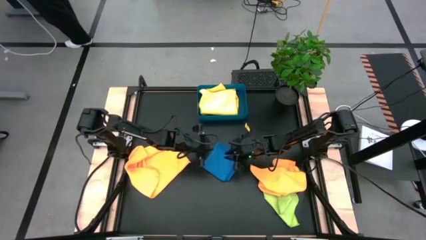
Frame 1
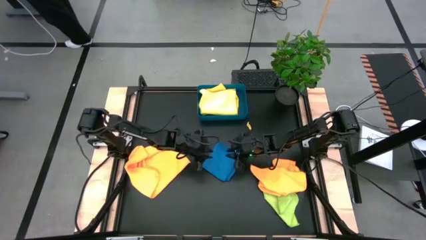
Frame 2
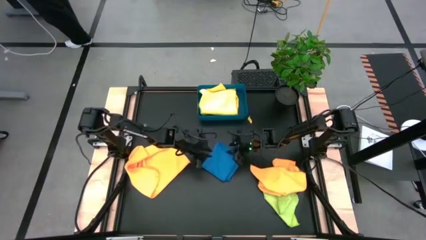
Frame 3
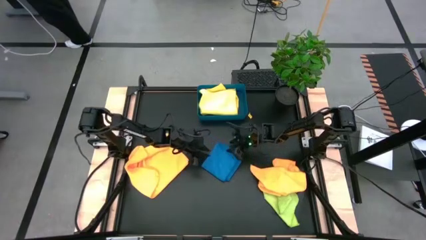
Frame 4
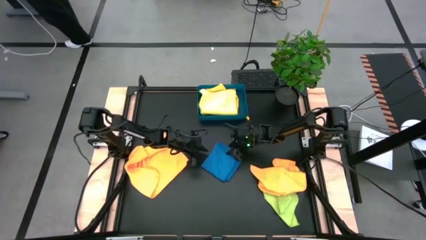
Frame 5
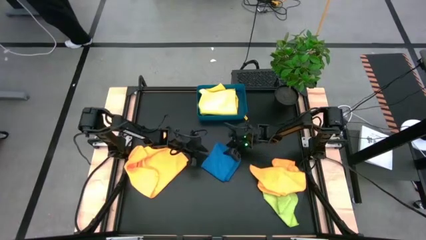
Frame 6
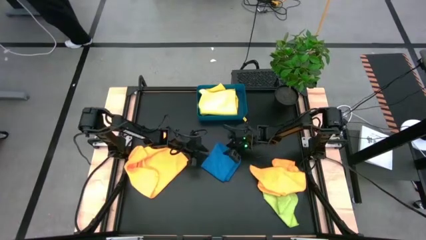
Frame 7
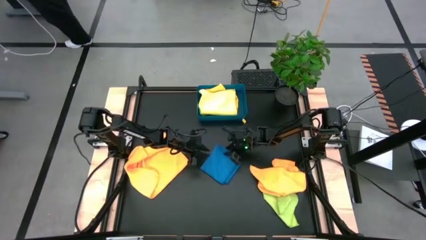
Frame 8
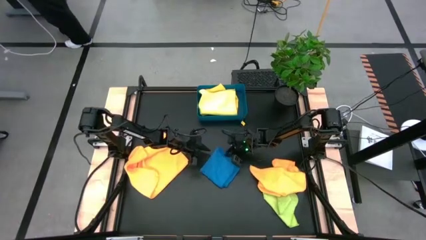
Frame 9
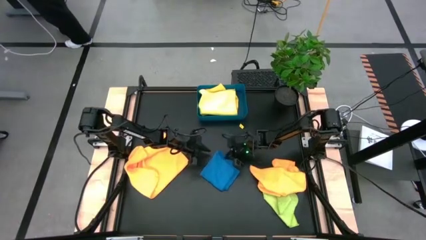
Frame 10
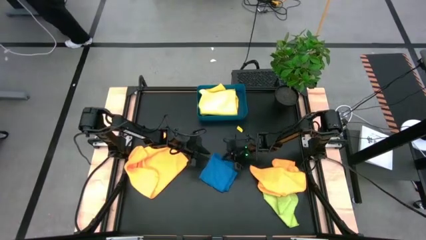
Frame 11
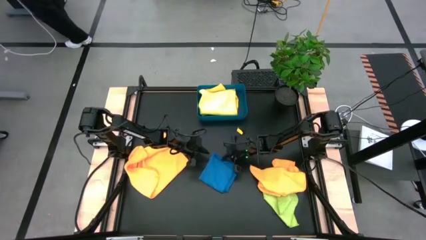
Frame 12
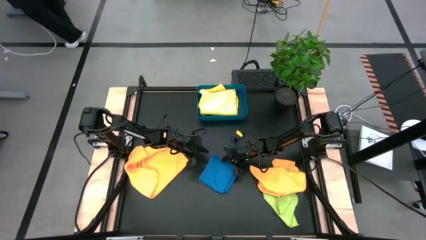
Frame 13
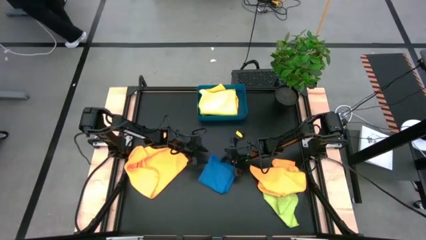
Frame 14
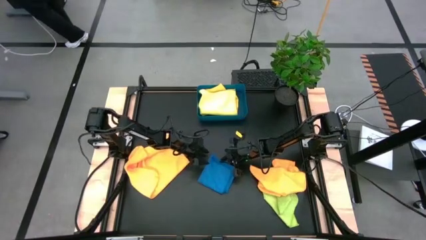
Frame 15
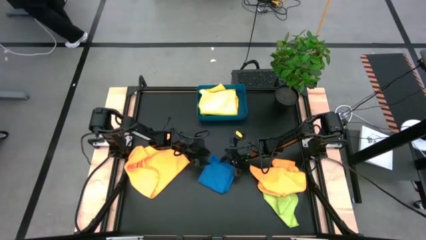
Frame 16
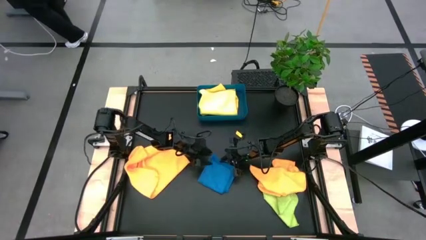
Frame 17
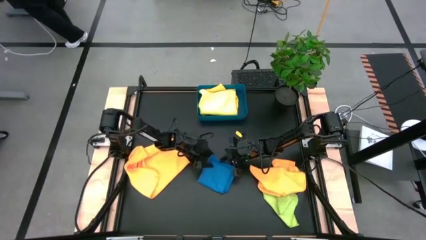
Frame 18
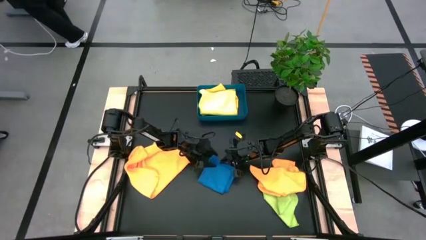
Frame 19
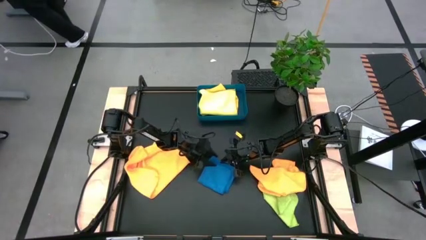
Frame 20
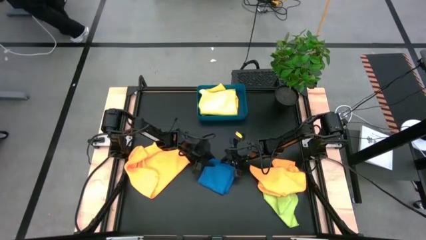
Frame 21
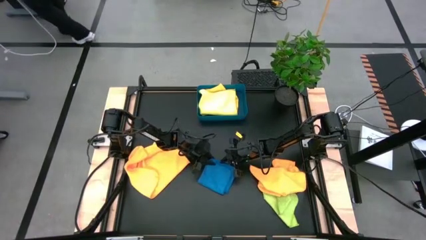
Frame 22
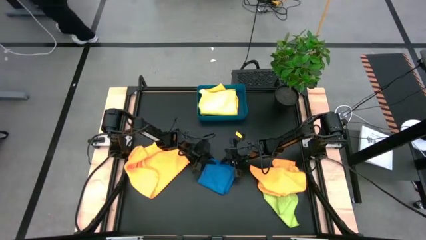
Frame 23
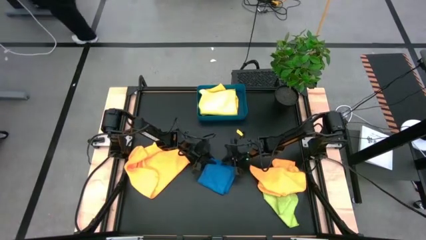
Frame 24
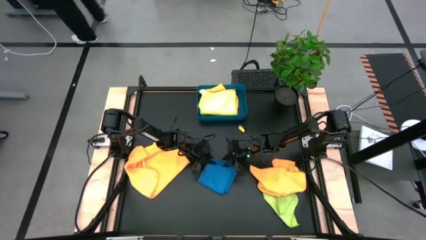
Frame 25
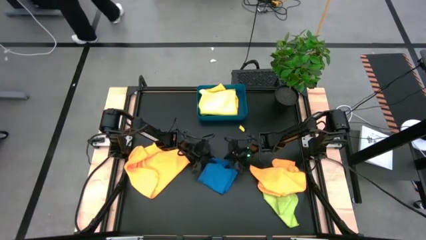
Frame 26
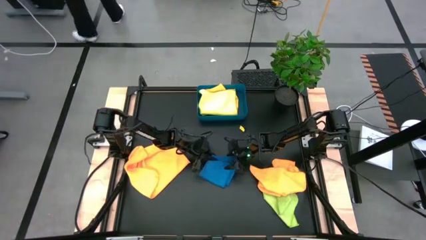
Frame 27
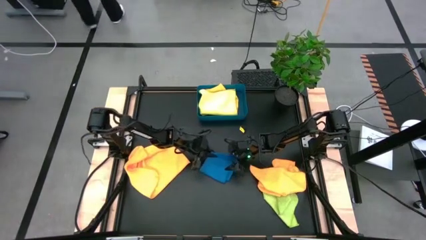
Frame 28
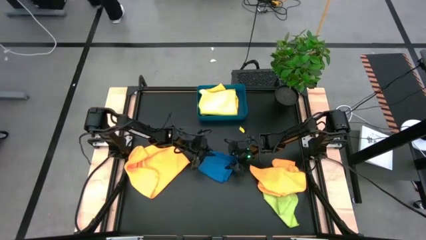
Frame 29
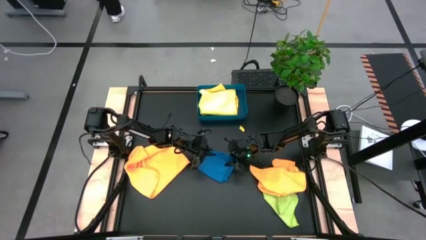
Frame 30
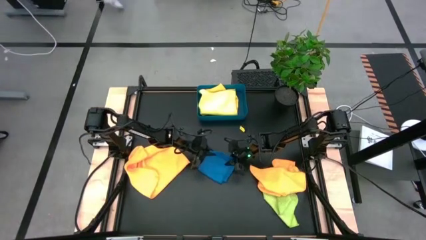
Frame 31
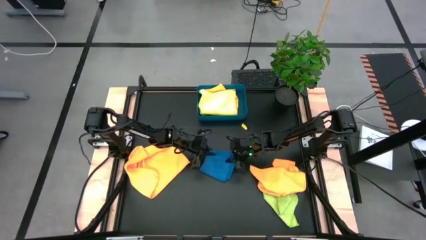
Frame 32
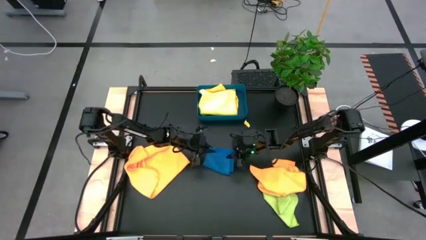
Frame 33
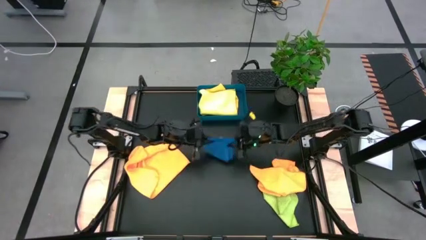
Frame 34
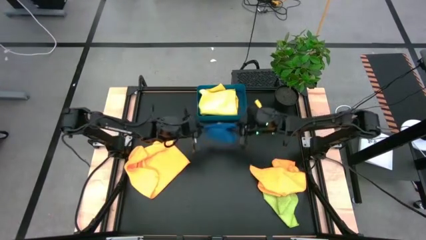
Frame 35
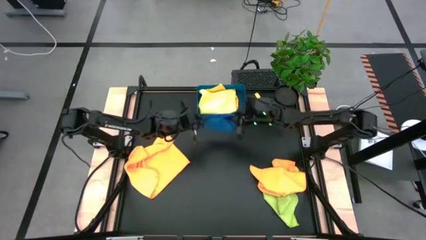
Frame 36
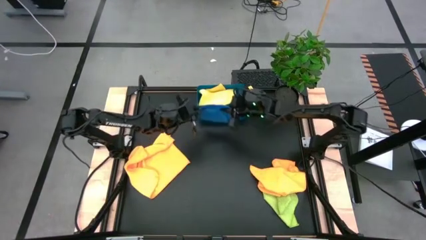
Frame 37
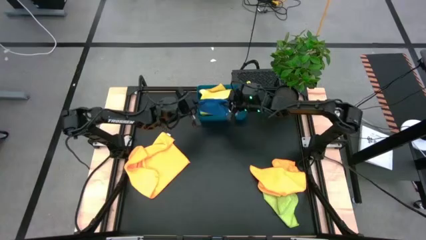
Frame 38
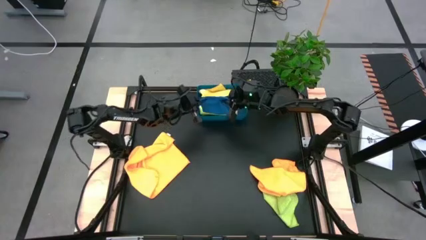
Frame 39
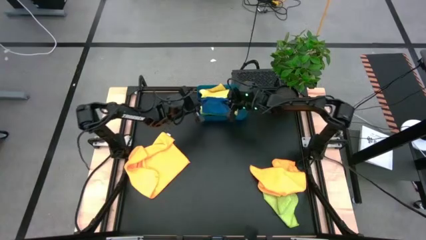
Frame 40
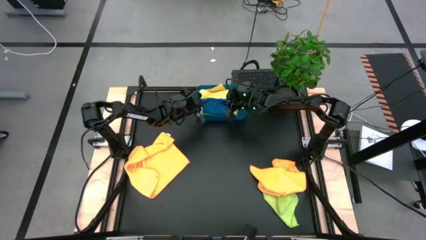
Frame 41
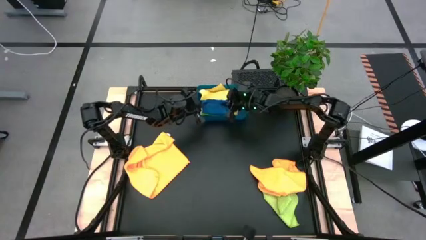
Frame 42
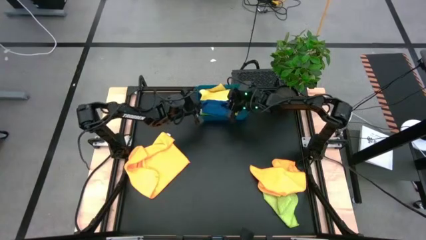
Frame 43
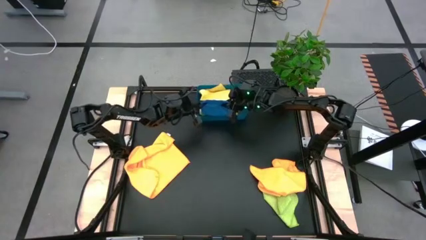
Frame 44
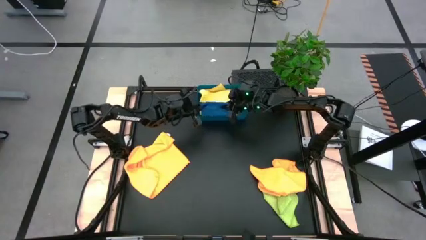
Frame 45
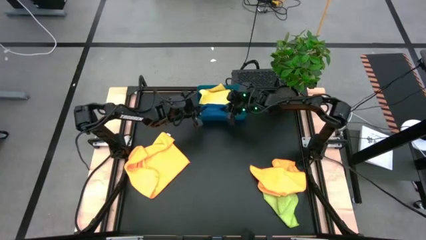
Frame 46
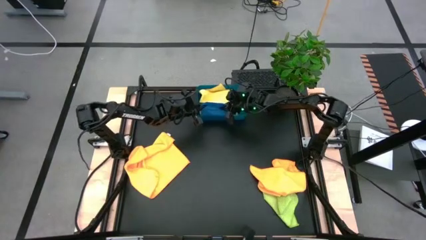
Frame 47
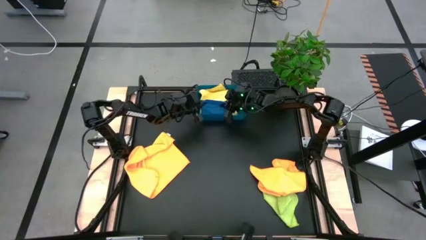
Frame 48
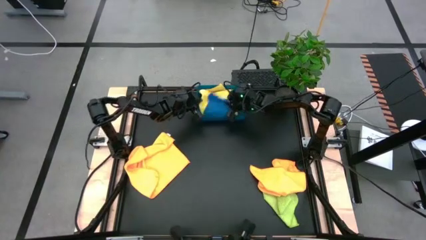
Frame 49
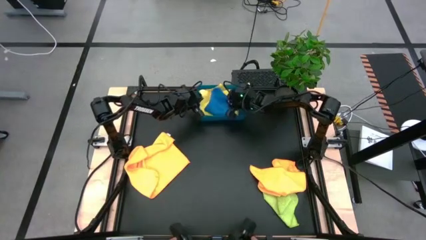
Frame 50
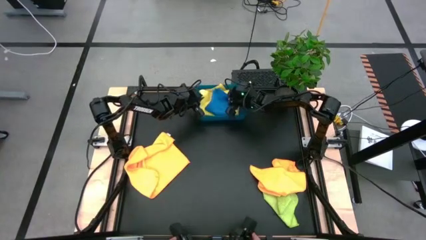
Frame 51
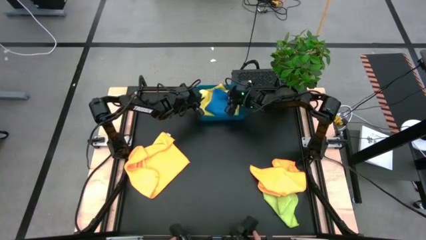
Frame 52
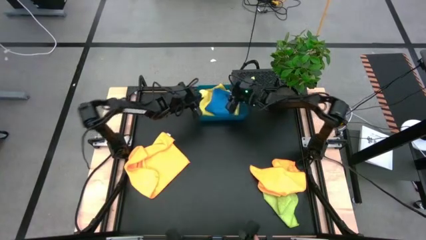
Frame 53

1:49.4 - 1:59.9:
Task: Fold microfiber towels
Stack the blue microfiber towel on top of the yellow microfiber towel in the bin
